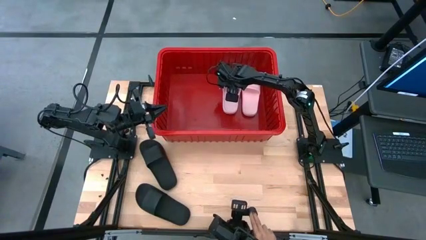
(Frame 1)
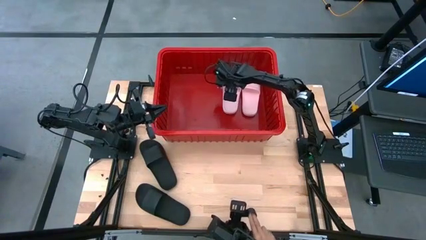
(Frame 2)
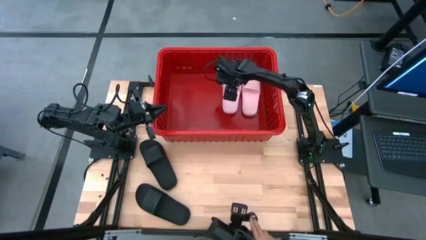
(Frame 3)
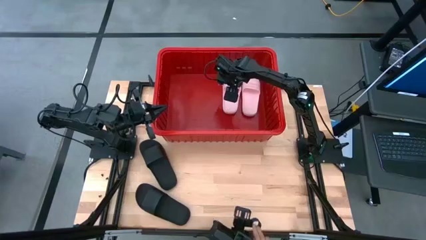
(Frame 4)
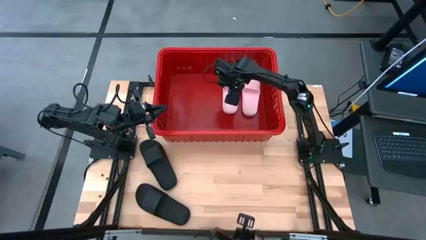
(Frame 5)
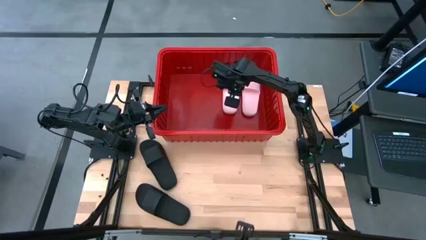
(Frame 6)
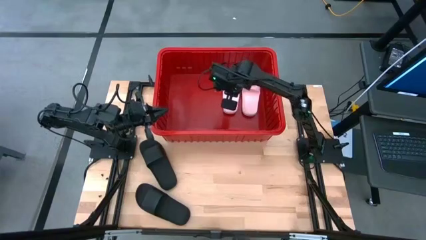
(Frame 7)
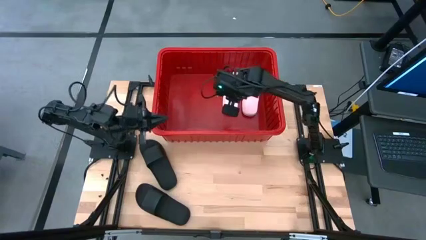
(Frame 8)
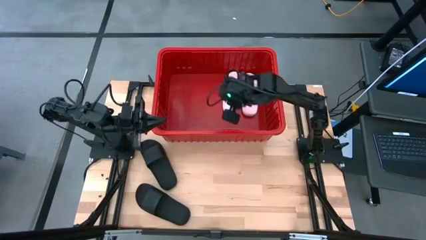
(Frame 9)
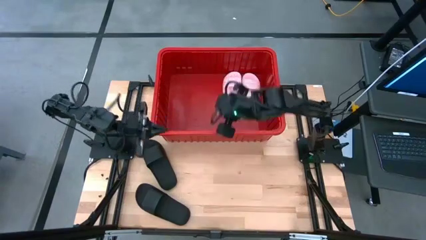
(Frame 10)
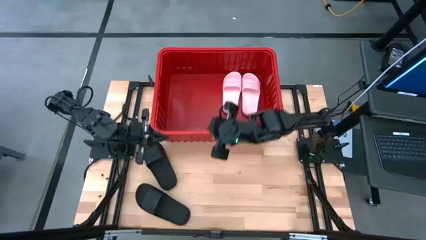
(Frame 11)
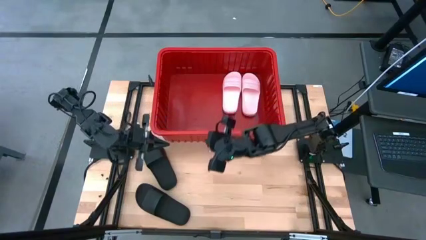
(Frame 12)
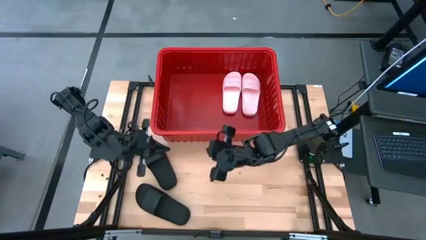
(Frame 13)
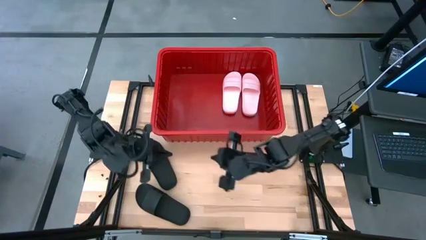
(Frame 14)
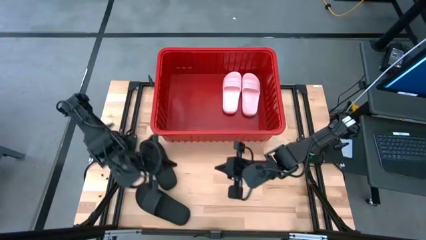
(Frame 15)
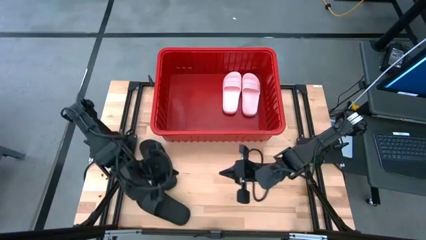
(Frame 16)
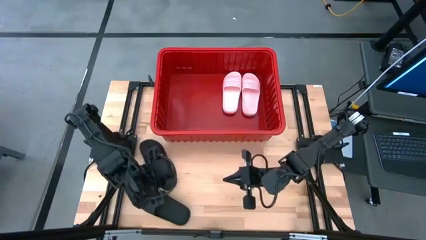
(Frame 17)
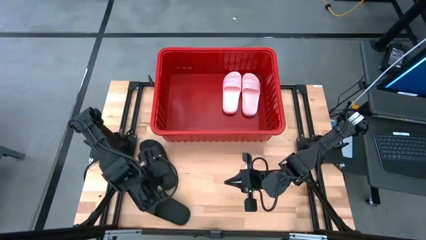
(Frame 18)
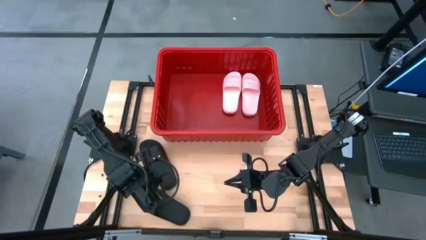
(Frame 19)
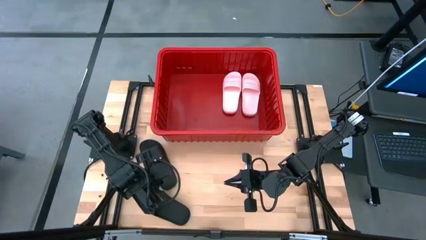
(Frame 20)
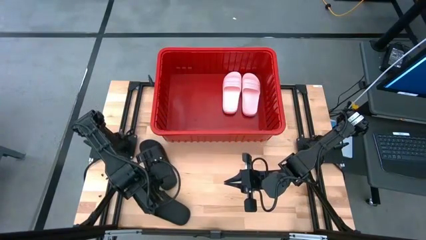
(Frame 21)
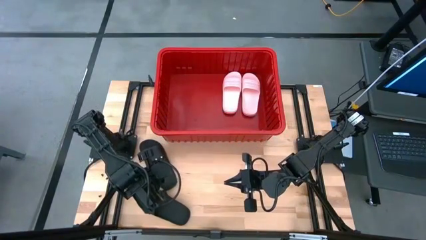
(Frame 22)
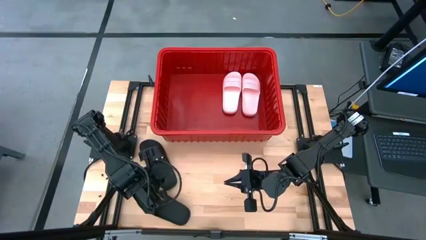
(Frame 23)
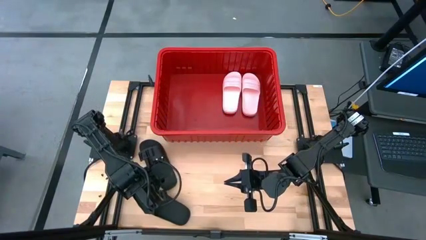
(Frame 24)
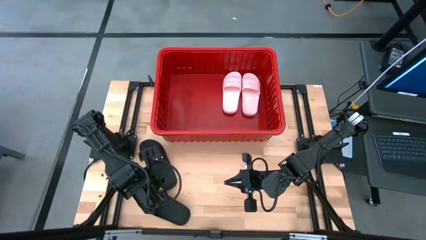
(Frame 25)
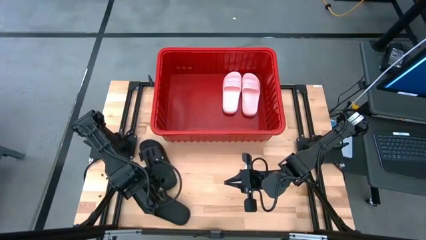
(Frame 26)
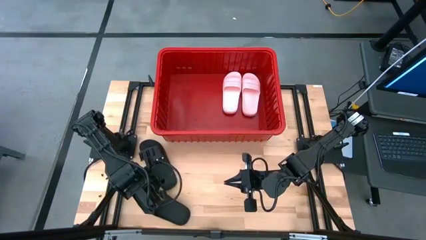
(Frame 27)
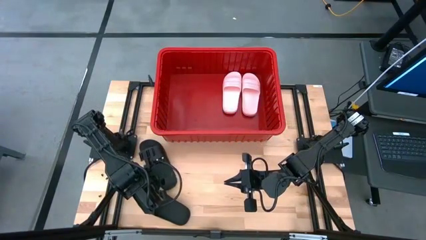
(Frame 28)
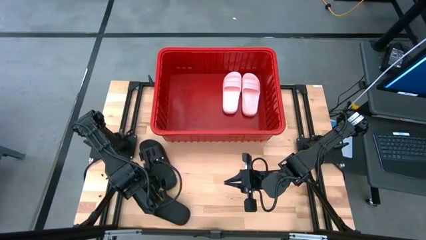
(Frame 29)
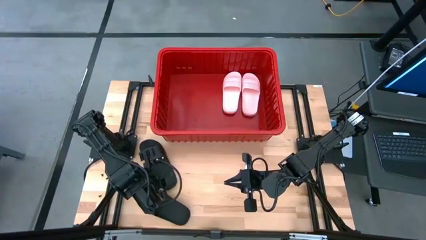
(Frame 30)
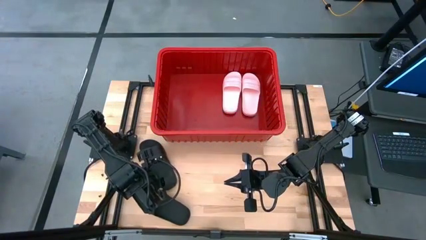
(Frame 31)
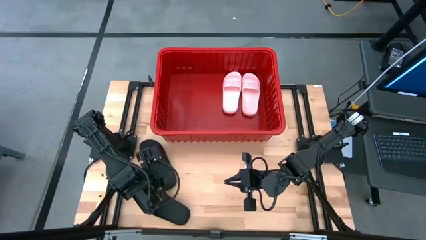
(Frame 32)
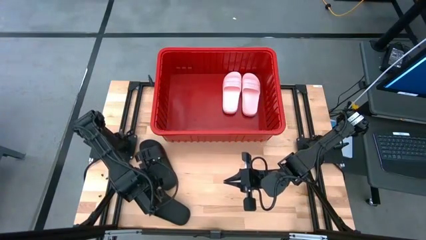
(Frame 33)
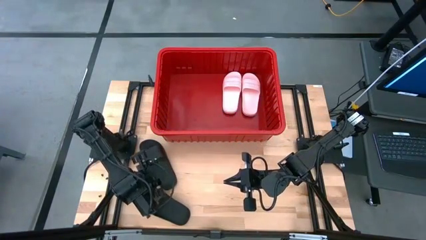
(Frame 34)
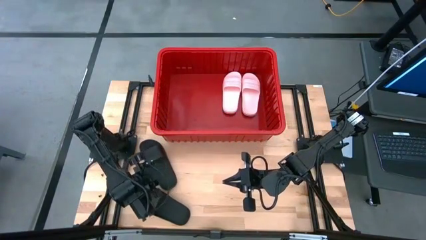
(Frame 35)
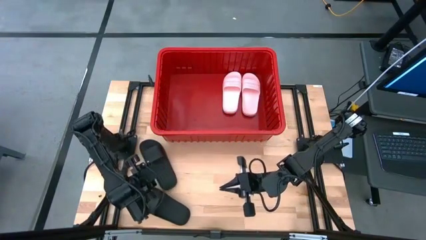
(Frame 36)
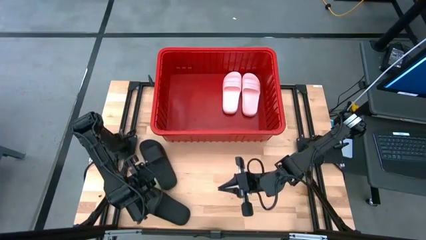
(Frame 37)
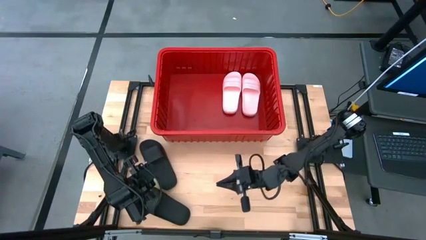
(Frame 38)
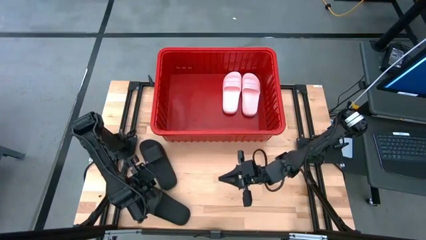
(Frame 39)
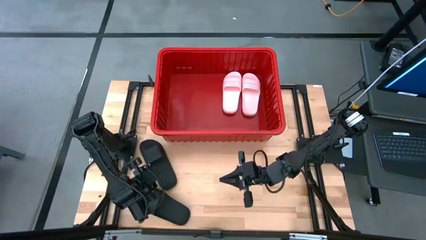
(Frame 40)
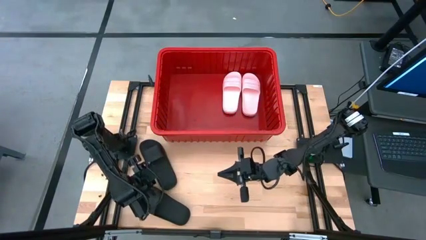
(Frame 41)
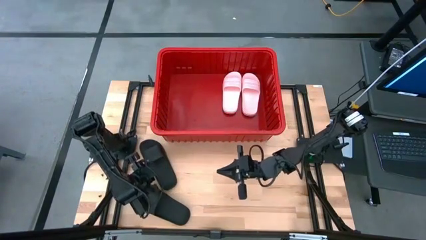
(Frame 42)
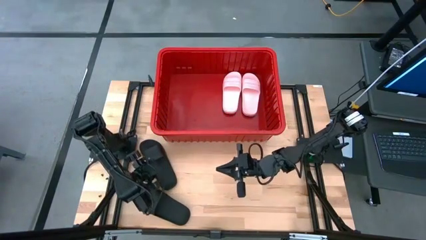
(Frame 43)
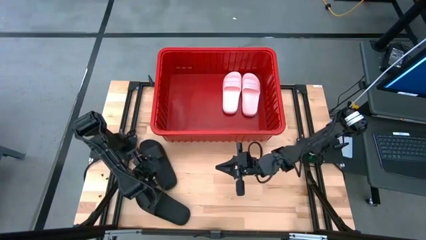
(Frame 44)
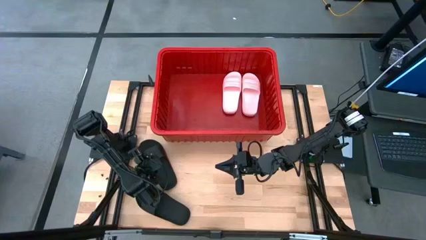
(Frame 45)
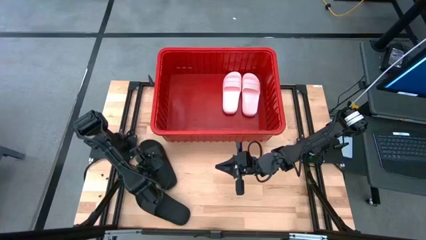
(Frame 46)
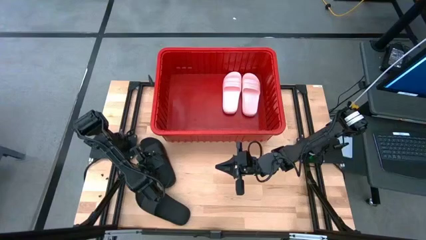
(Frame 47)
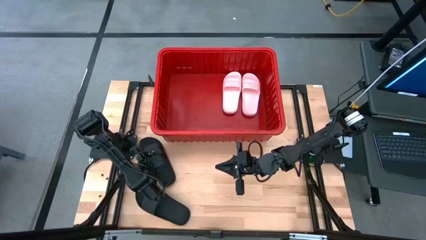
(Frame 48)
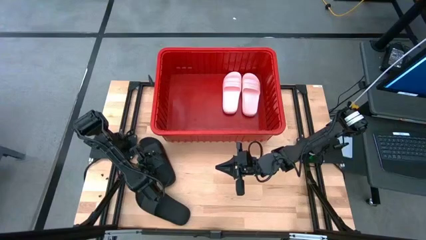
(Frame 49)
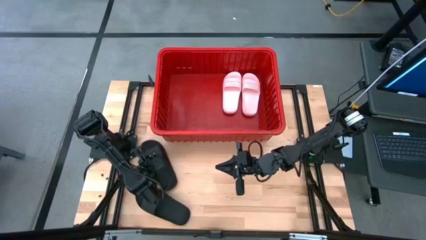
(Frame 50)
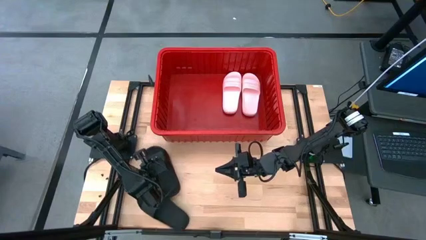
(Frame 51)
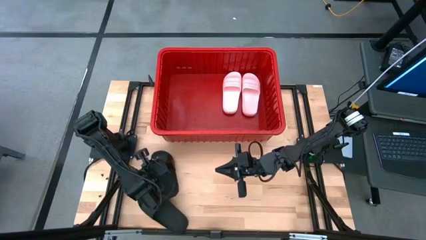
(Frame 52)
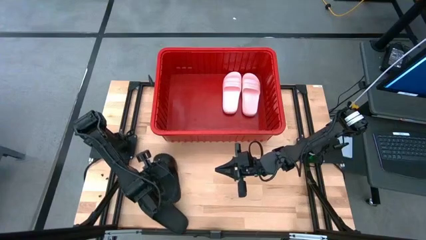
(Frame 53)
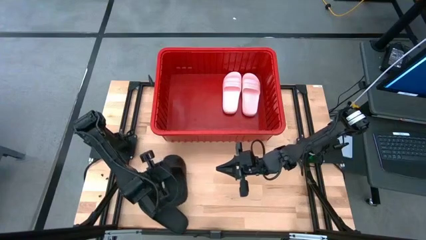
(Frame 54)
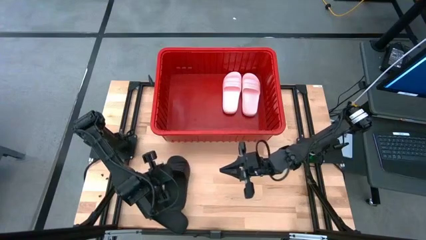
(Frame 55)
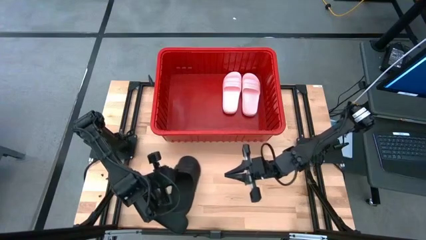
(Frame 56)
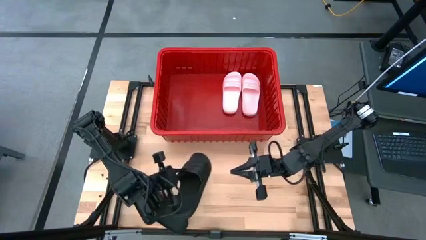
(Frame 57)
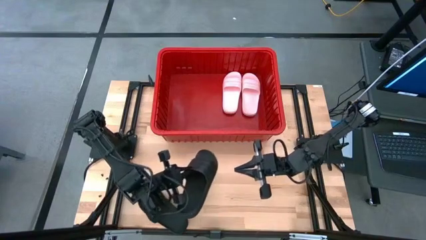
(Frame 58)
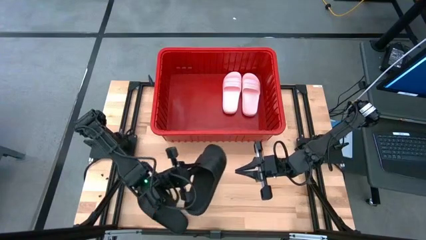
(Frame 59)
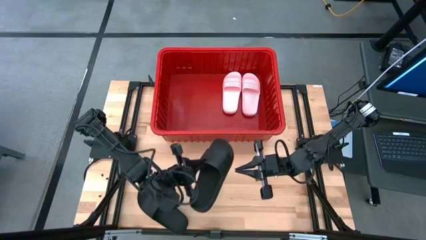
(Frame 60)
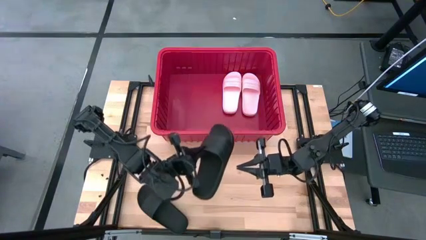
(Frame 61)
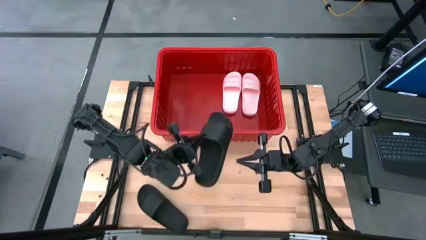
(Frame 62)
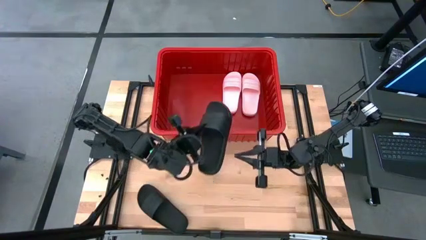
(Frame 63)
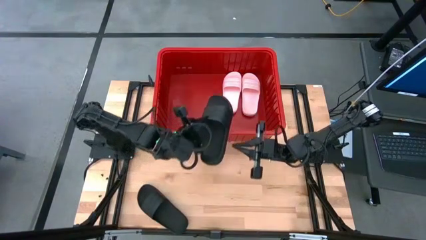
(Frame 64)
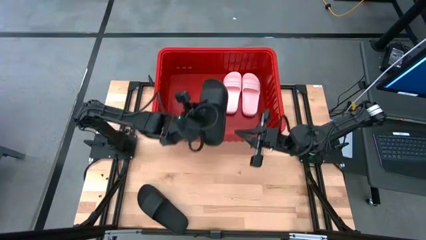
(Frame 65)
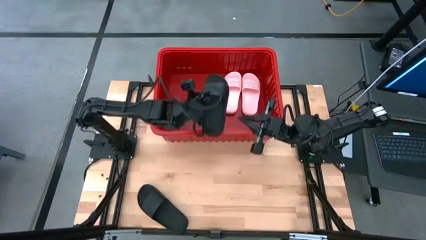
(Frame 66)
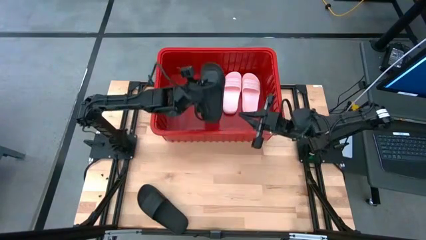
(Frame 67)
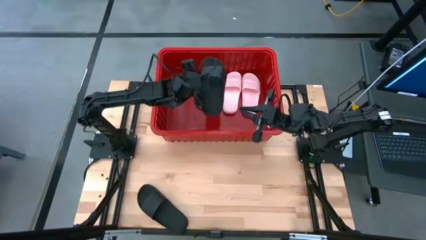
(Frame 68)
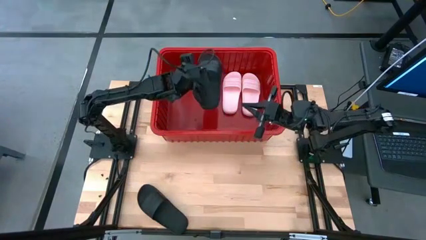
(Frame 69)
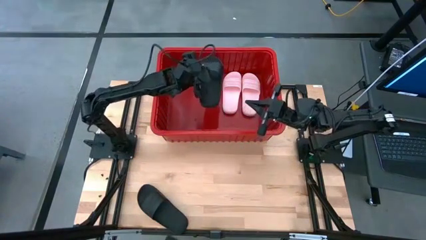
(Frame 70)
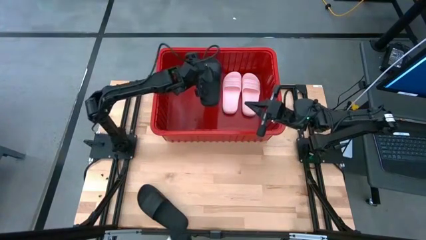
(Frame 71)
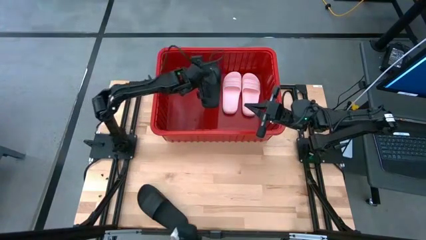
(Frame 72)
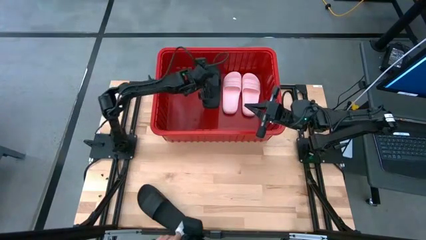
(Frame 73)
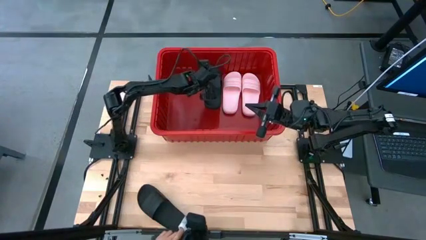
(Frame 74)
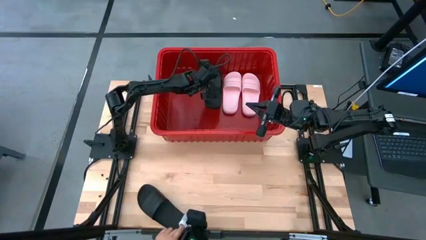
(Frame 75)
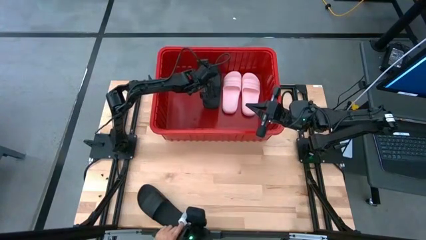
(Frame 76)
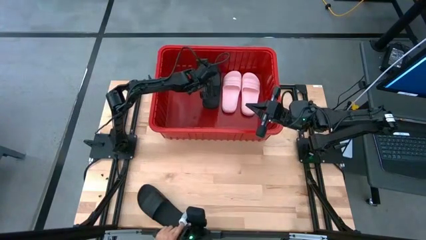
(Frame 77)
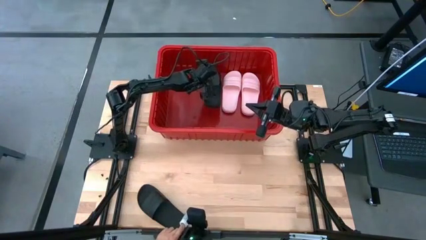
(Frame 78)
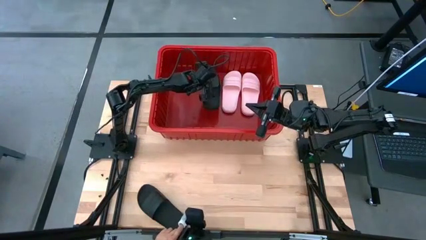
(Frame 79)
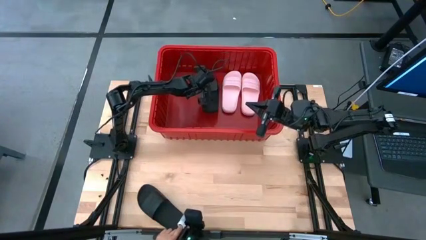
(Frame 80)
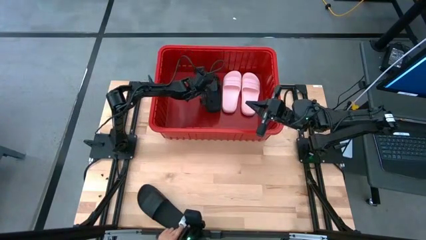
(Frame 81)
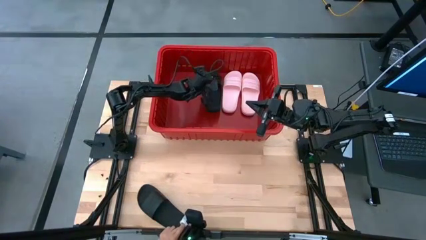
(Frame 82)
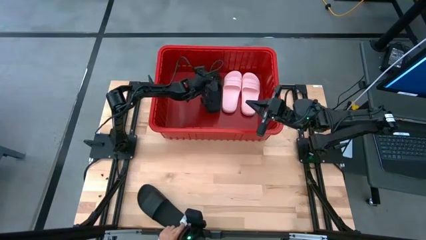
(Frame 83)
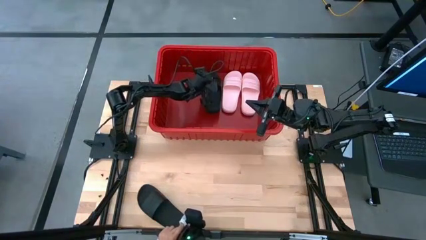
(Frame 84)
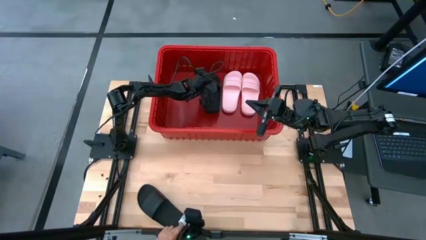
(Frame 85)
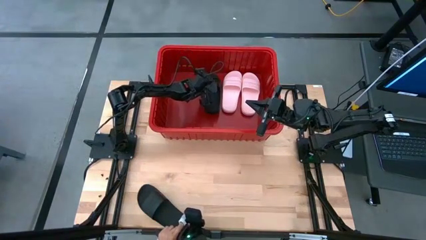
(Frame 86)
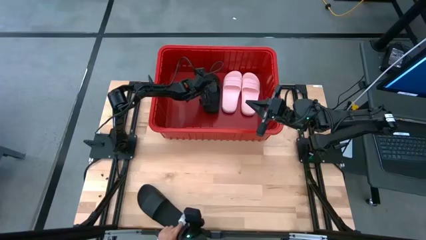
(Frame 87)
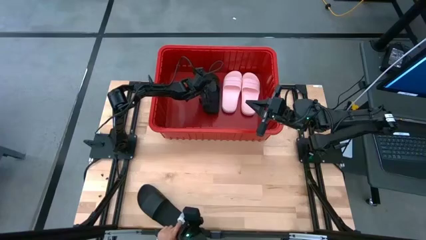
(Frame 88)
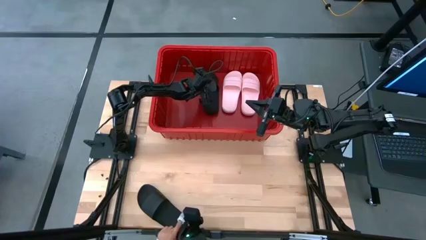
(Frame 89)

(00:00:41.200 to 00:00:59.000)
Task: Pick and place slides into bin
Put the top black slide into the red bin
